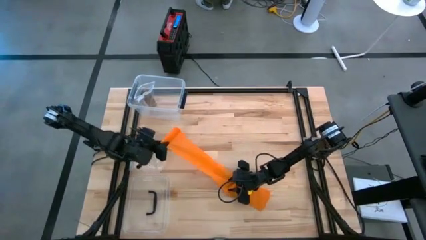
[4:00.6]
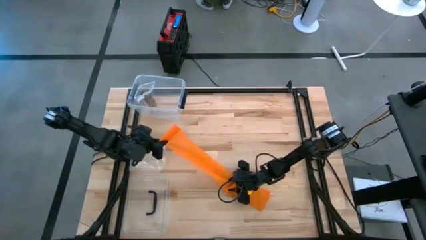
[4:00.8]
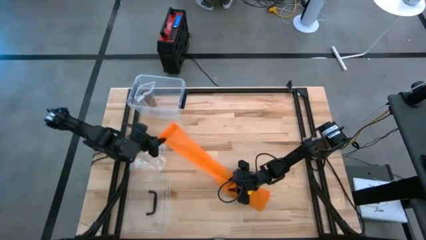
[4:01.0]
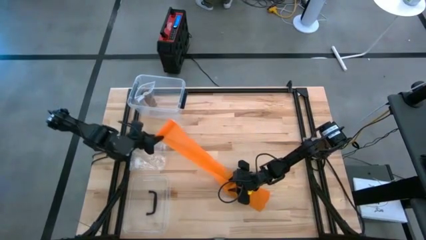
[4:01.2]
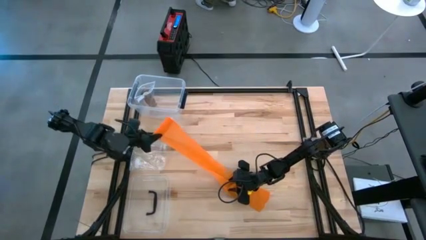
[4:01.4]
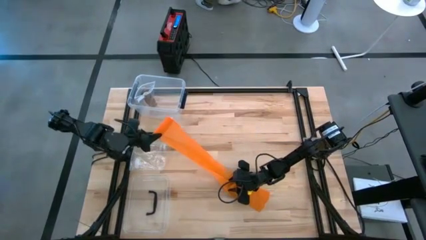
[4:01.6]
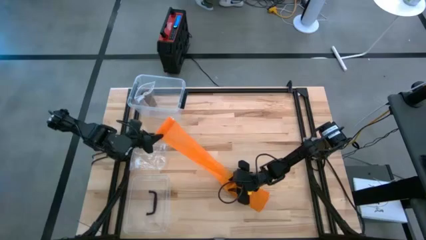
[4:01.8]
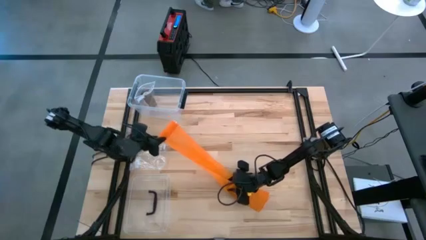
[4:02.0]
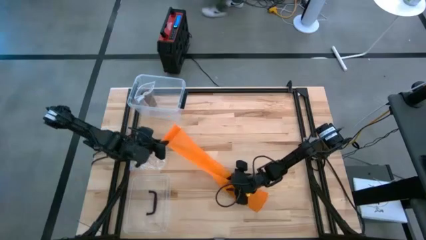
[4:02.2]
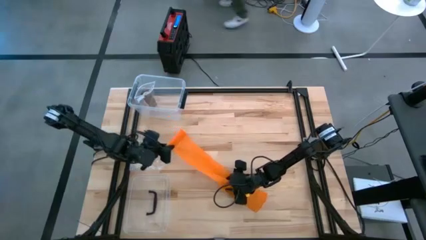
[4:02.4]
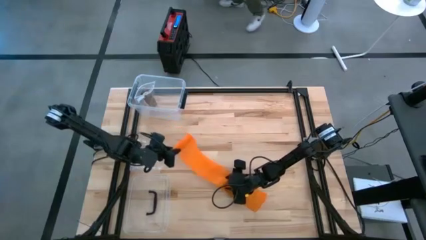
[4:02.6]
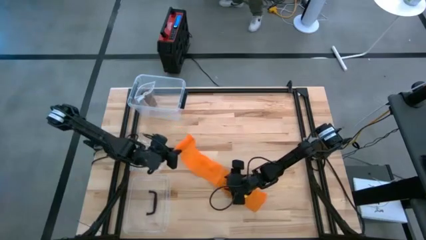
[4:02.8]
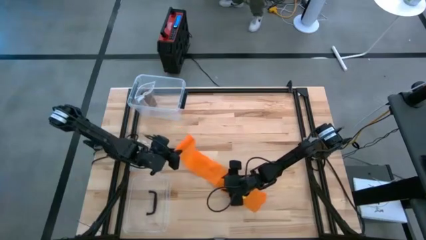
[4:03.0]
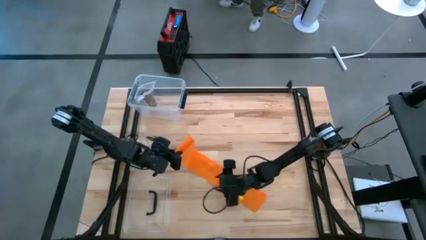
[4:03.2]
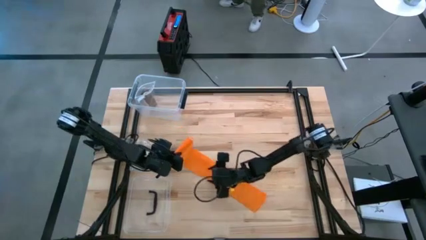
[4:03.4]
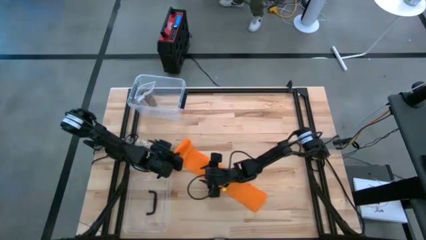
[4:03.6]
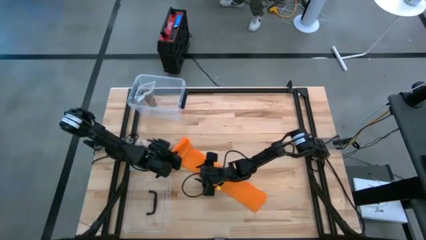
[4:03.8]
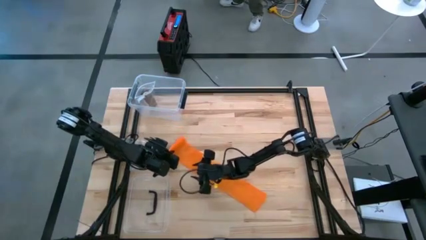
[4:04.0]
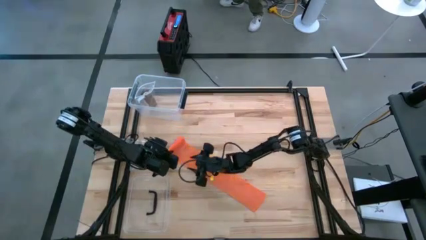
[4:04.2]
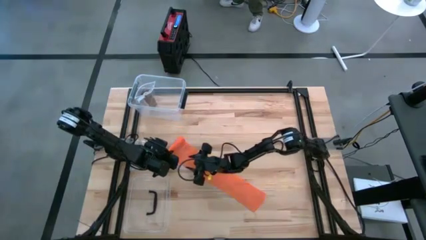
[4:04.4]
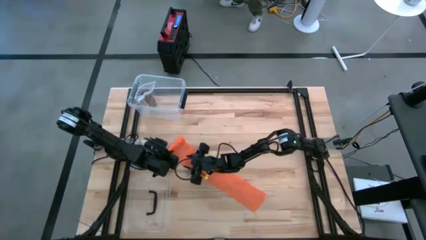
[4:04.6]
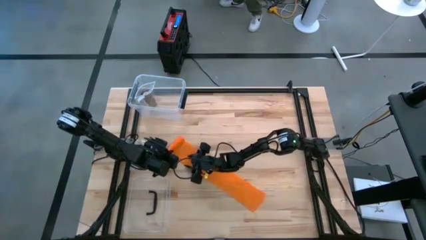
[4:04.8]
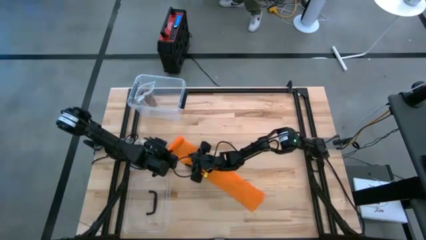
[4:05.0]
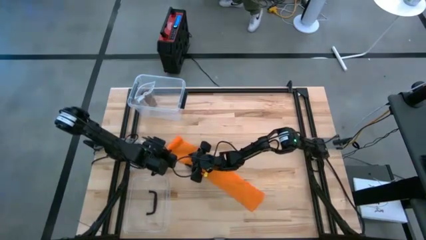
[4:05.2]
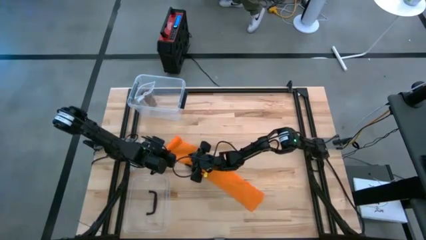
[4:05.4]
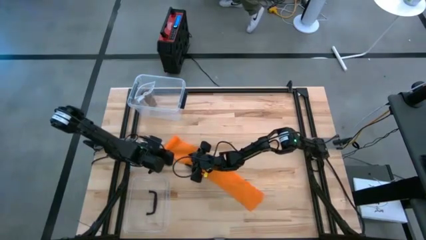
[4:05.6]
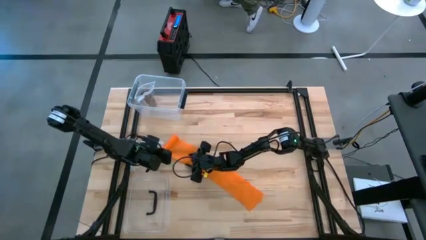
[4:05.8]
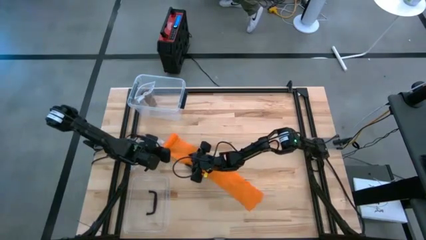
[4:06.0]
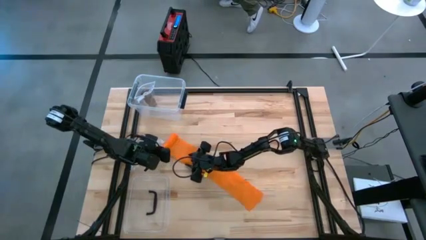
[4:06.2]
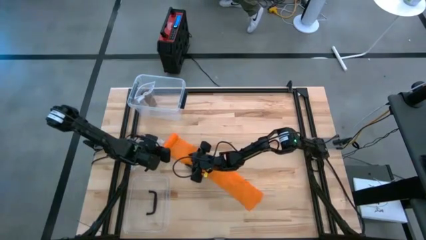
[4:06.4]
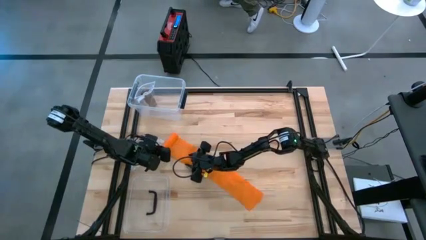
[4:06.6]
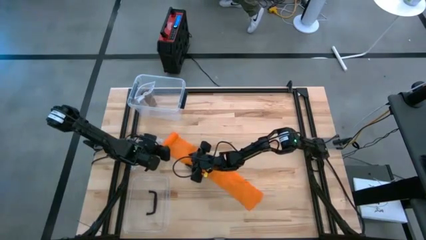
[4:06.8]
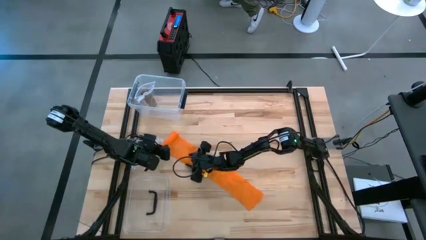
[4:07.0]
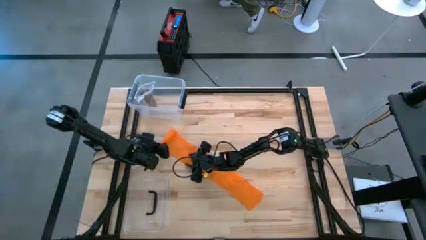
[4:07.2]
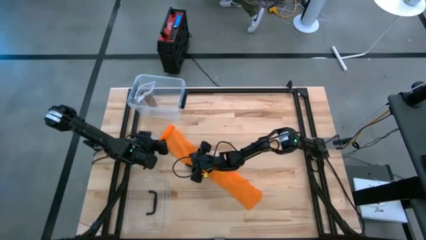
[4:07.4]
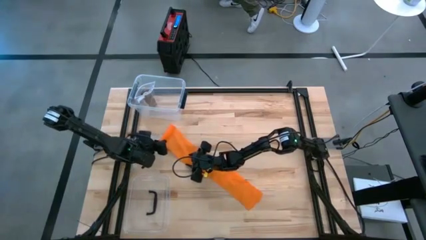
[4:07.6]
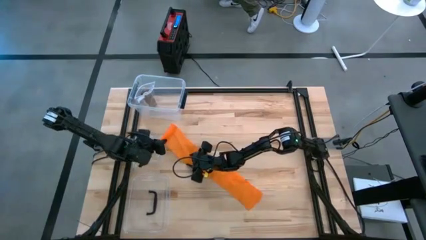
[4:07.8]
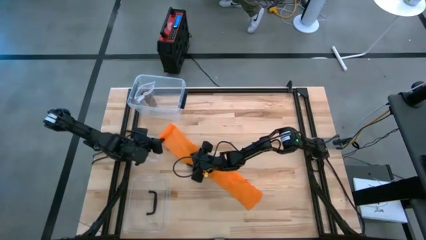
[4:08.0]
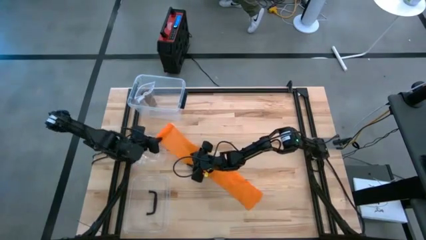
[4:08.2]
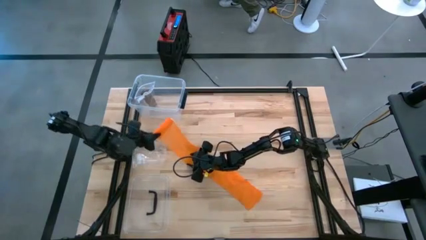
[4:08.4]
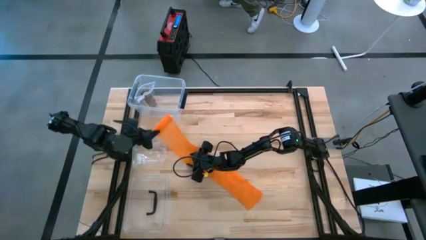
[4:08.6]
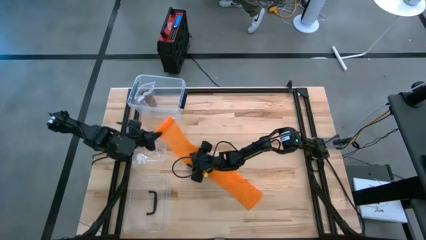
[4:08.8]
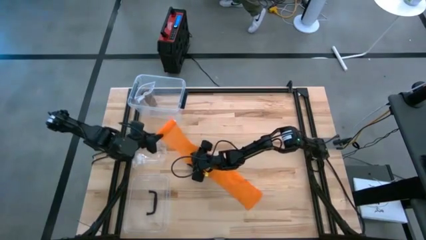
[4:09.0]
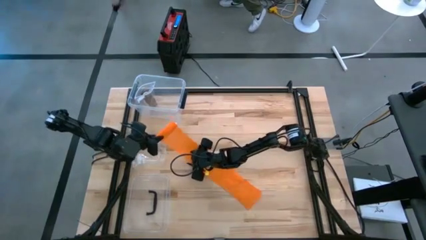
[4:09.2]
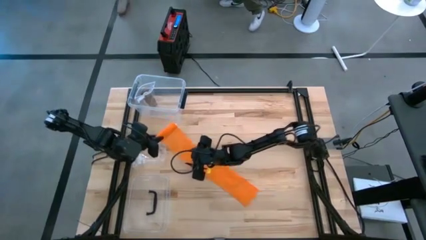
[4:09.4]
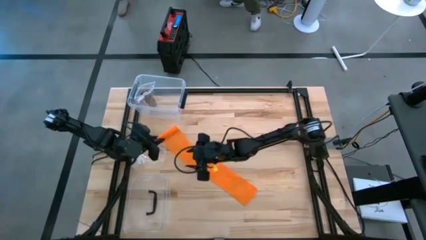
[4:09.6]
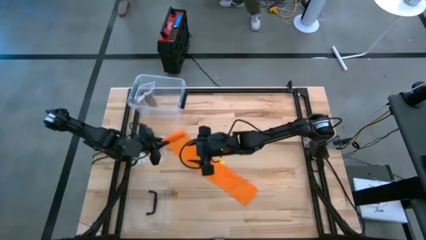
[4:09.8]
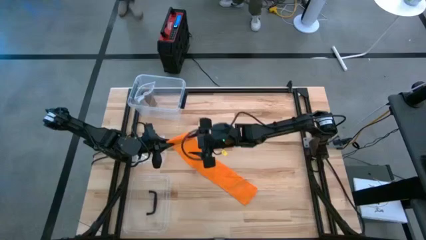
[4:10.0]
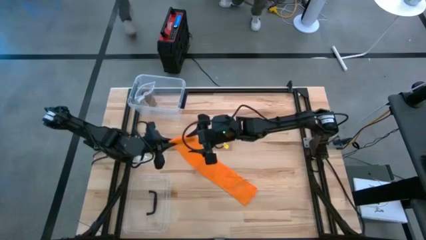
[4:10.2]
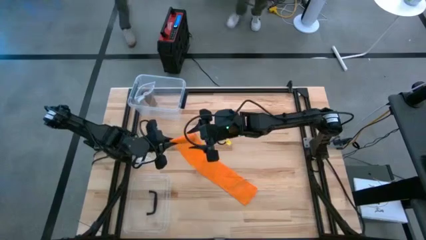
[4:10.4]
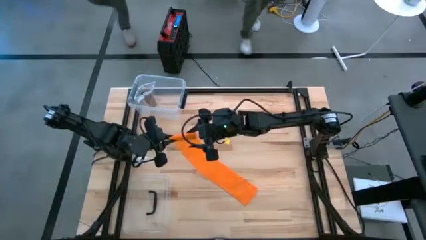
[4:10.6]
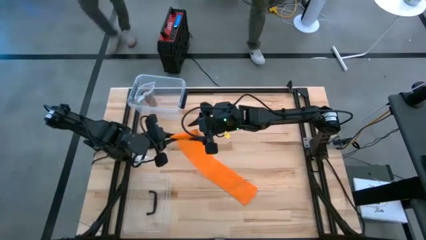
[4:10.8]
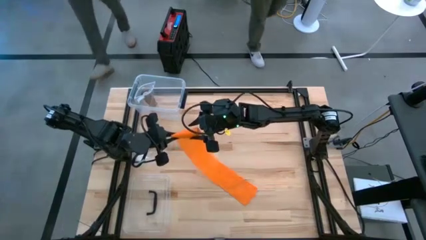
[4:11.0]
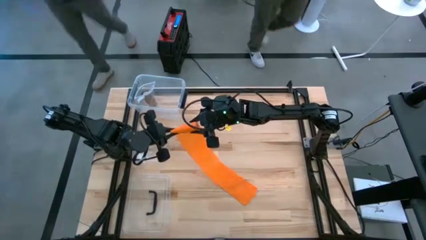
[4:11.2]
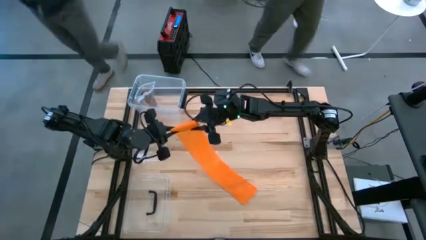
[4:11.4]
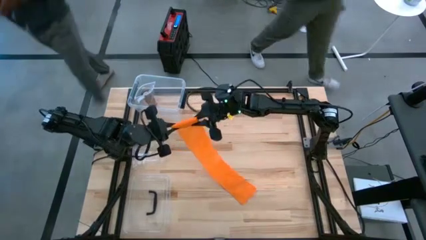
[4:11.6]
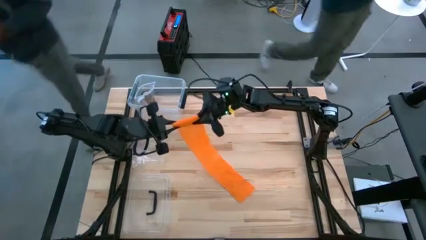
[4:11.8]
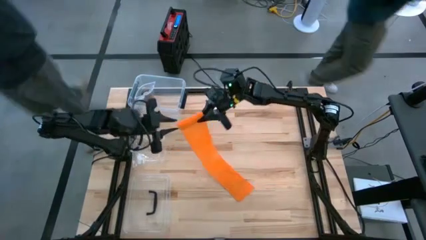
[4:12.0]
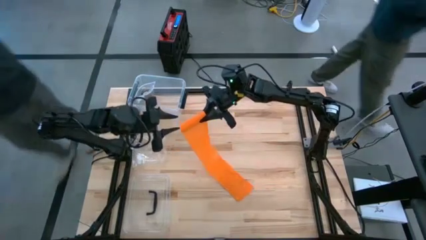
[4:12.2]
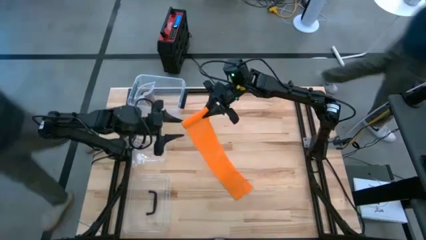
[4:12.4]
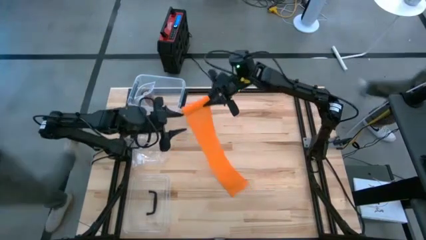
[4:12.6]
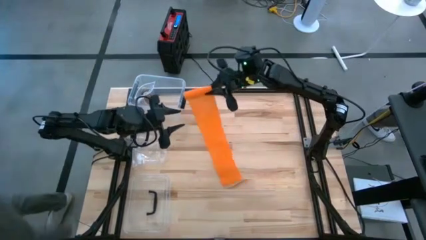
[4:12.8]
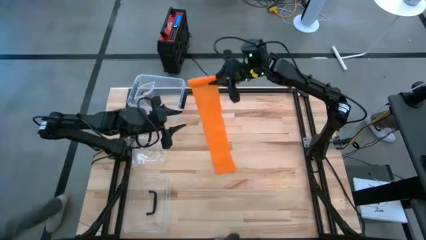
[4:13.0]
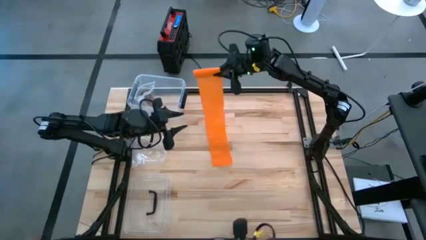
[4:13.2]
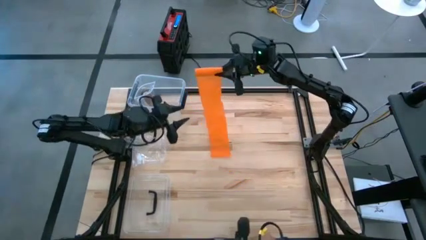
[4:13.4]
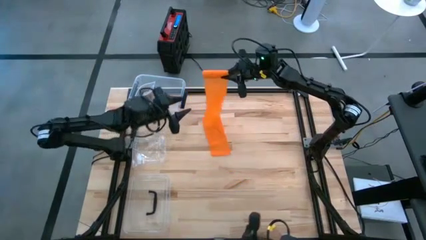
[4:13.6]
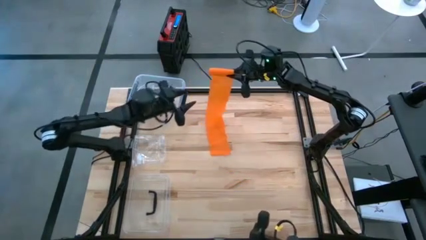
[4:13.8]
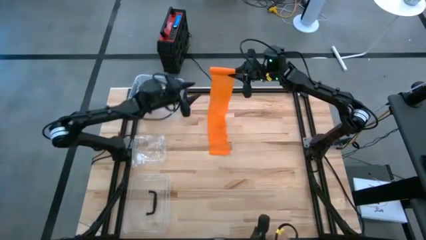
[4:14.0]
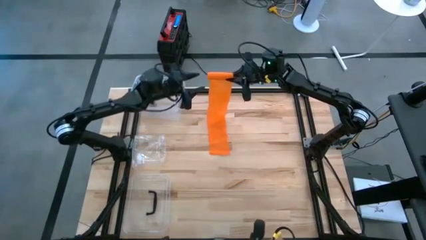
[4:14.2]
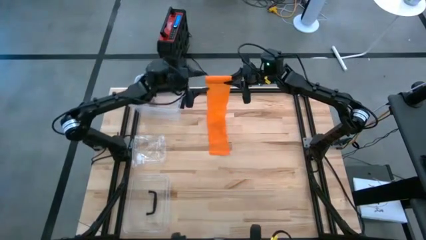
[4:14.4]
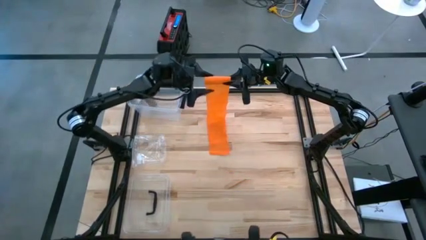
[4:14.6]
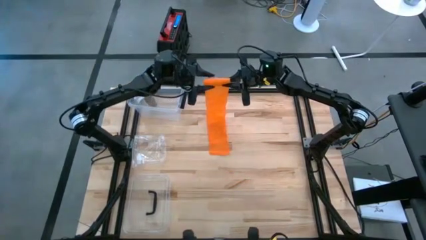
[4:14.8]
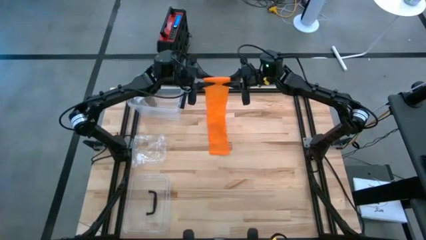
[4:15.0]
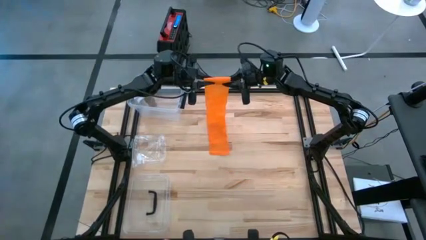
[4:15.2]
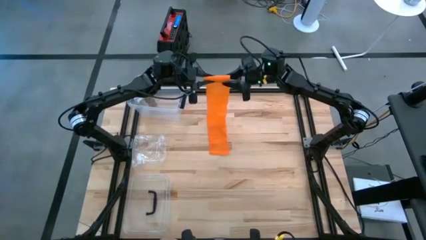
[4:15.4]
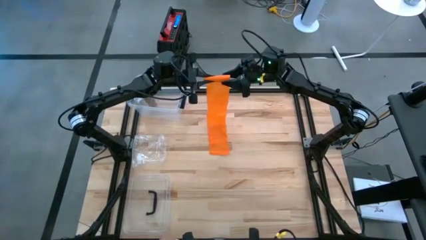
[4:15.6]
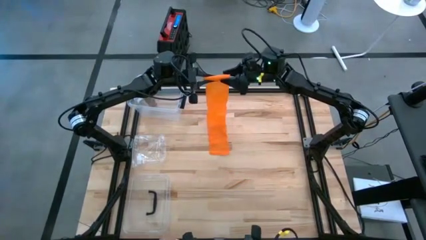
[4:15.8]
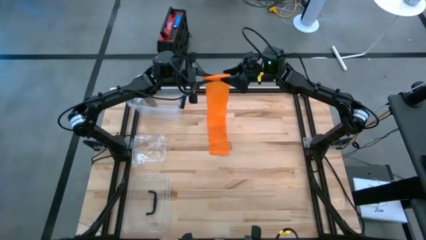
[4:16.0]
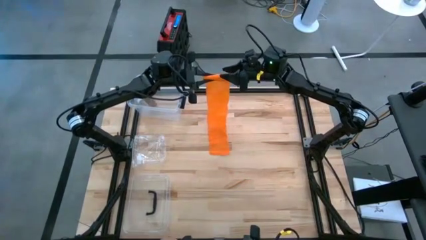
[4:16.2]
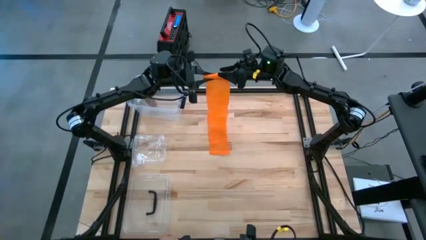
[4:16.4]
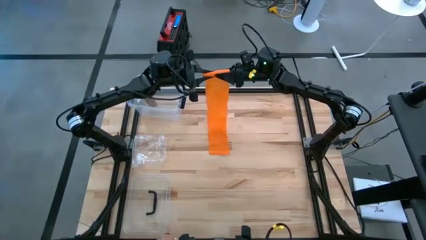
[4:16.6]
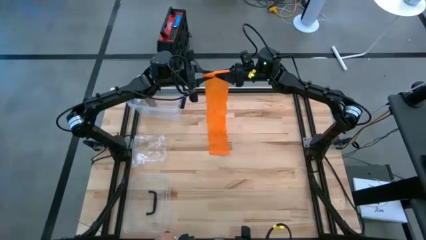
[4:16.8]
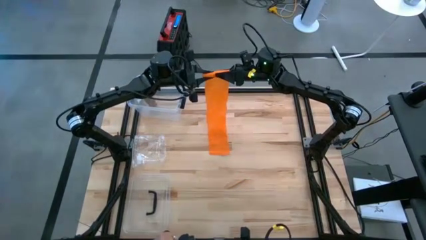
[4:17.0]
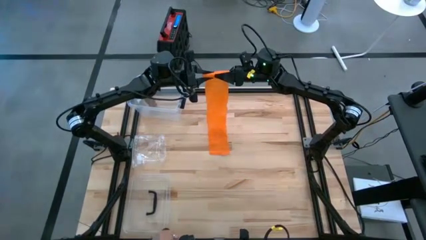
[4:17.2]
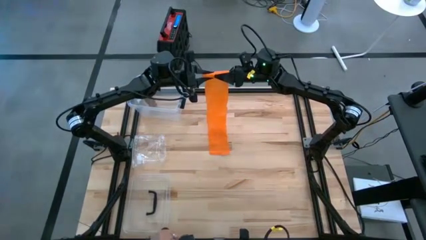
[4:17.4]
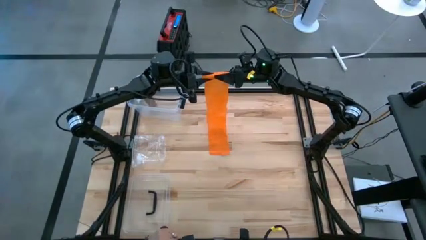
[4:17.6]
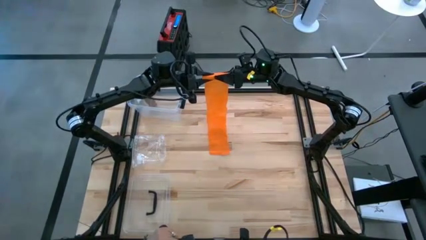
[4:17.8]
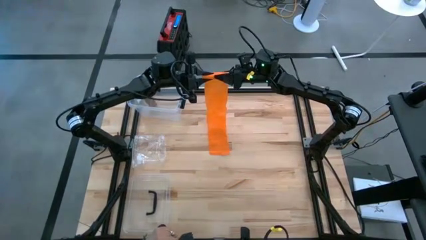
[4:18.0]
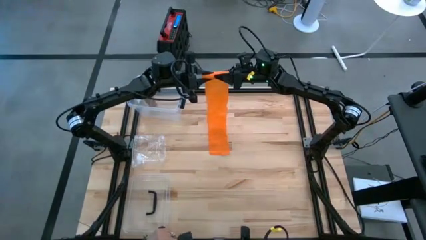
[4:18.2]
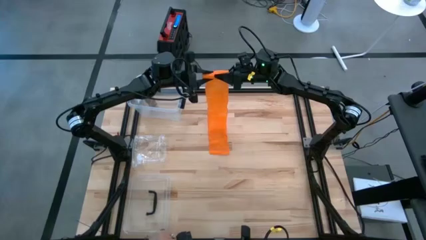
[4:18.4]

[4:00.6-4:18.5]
Task: Roll bandage
Roll the orange bandage
